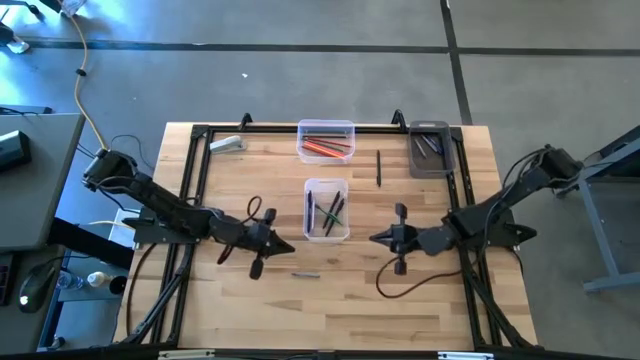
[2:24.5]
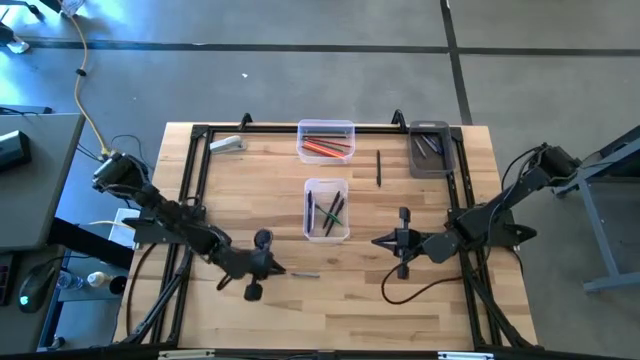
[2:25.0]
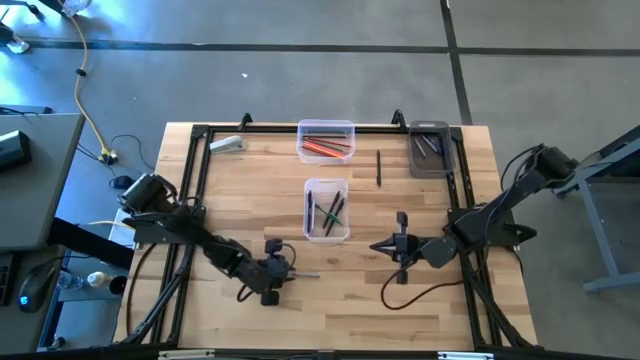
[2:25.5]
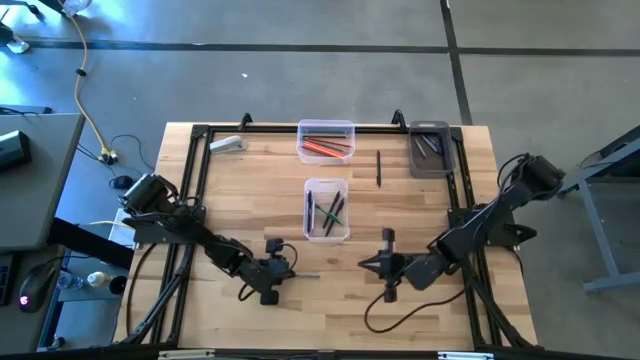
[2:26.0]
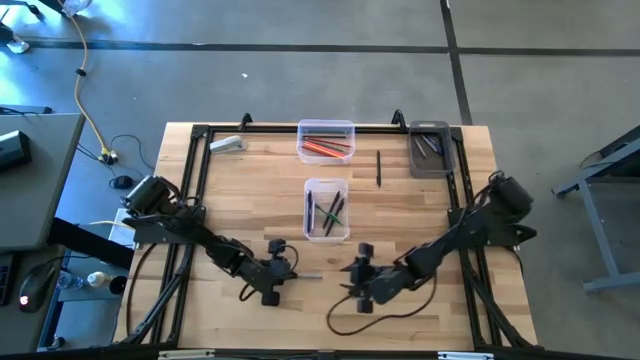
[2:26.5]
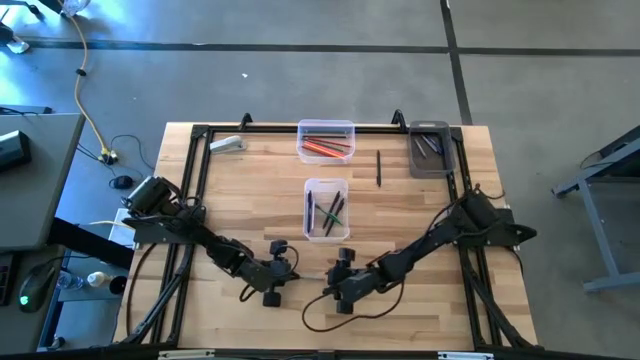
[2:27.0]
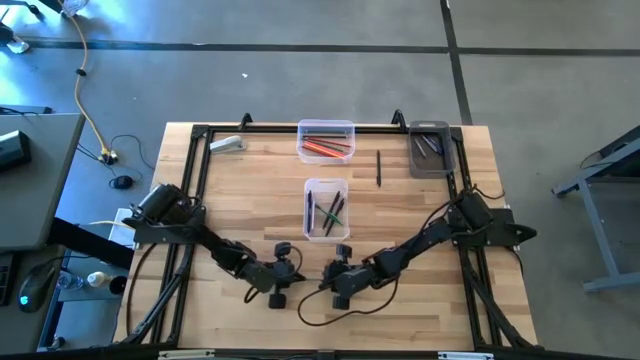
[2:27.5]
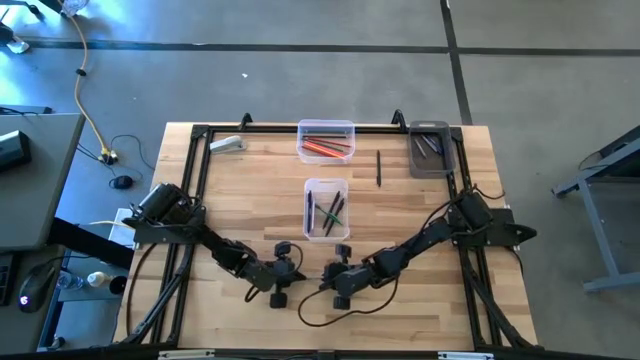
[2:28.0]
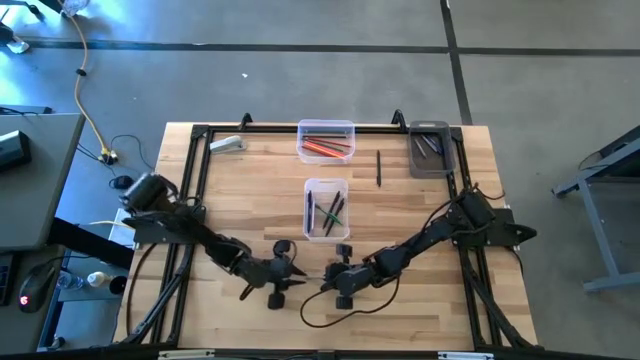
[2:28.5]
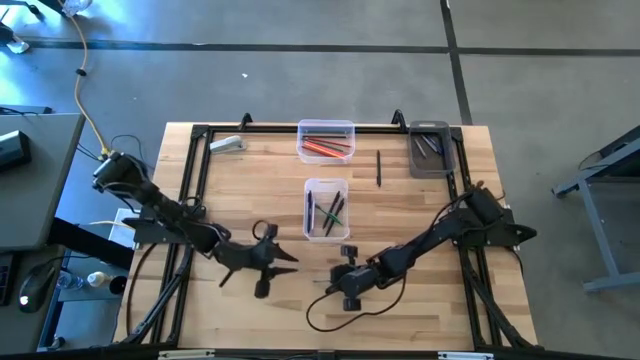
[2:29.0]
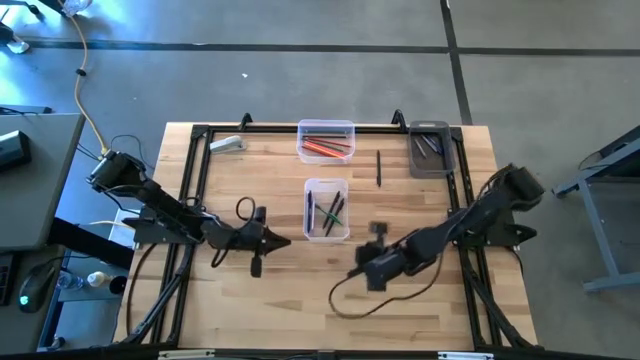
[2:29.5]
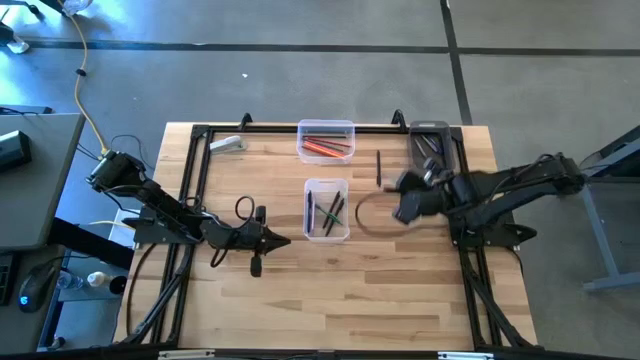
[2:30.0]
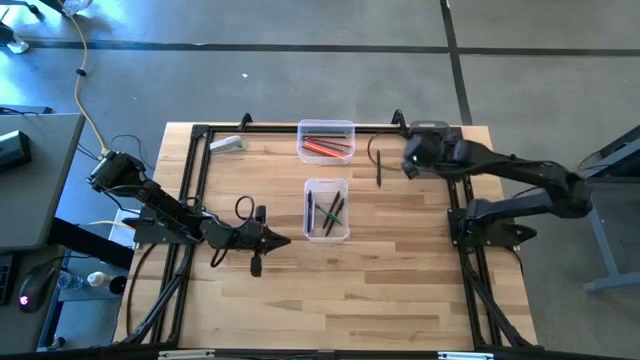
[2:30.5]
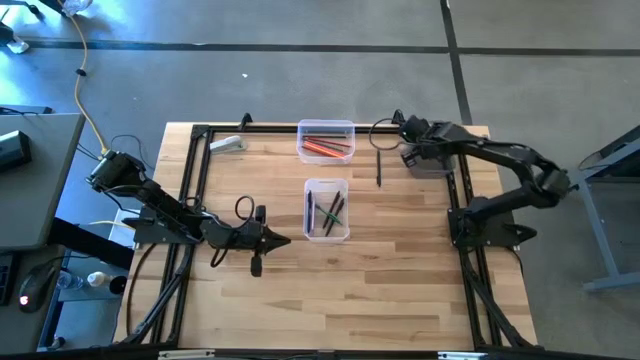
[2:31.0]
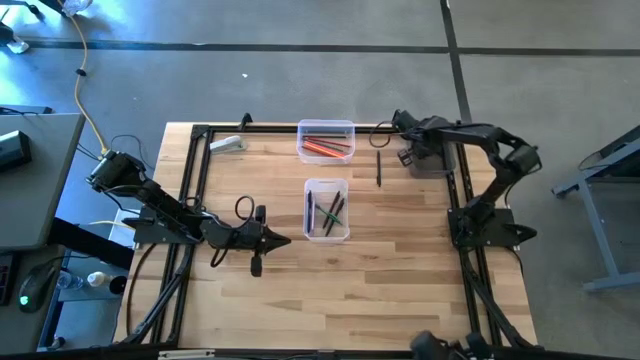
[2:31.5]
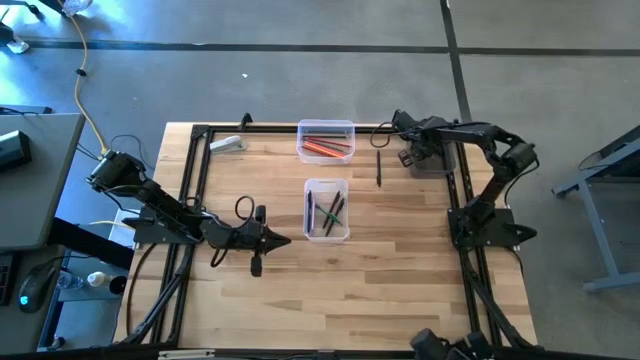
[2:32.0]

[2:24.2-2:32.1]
Task: Sort crayons/erasers/pens/pencils in bins
Put the gray crayon into the transparent black bin

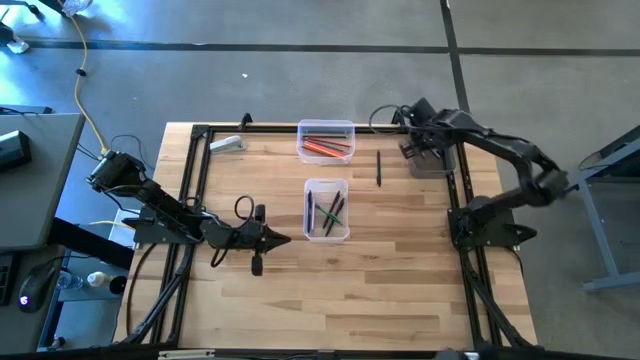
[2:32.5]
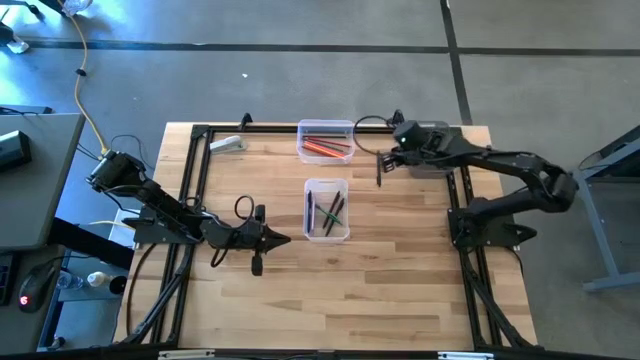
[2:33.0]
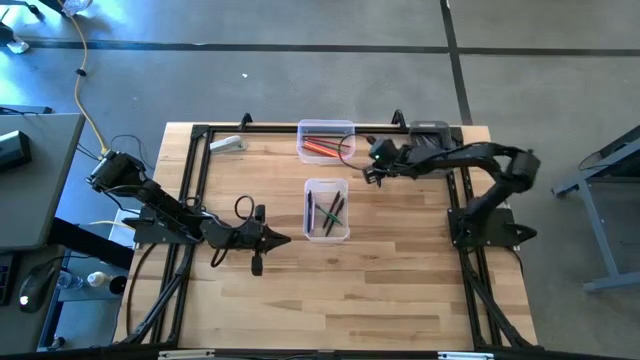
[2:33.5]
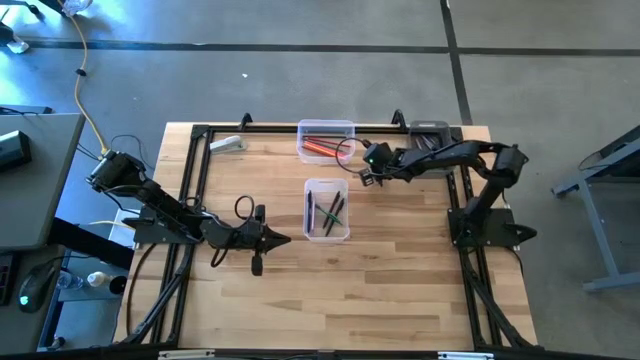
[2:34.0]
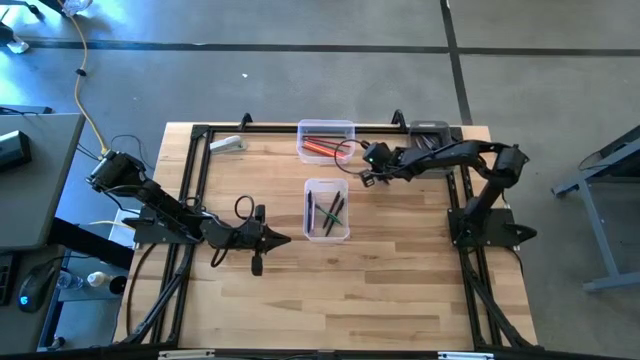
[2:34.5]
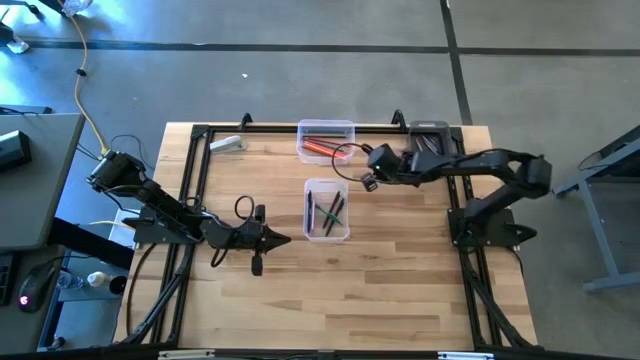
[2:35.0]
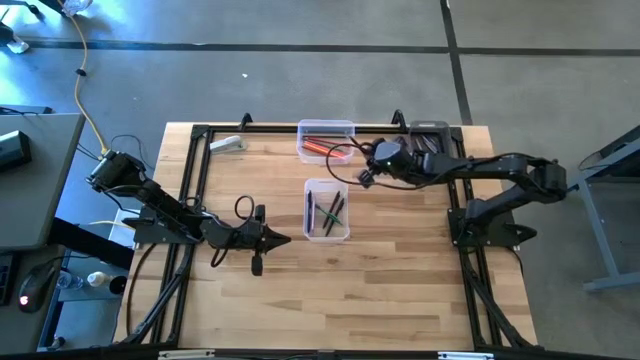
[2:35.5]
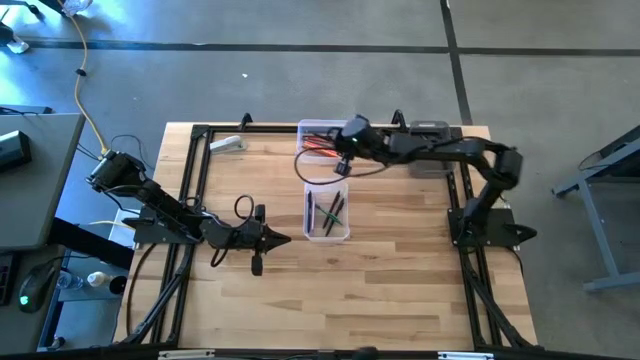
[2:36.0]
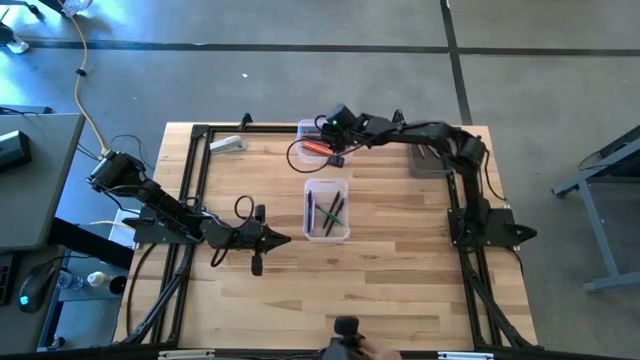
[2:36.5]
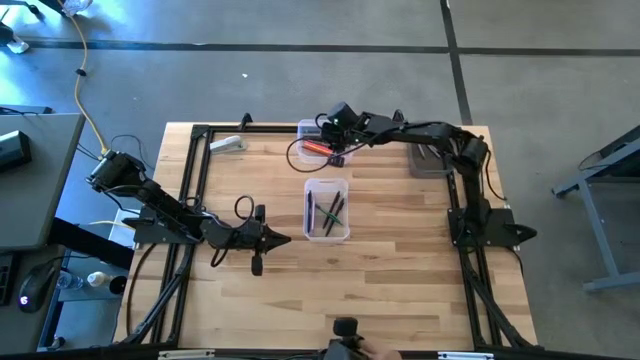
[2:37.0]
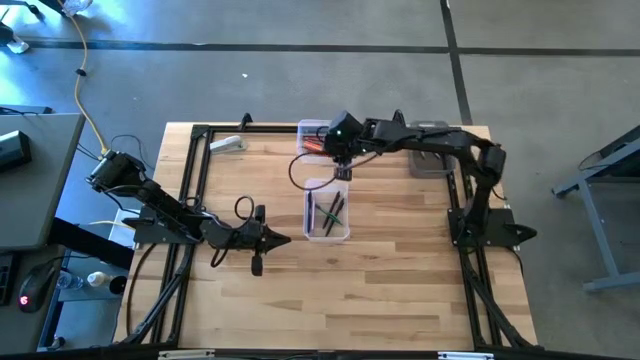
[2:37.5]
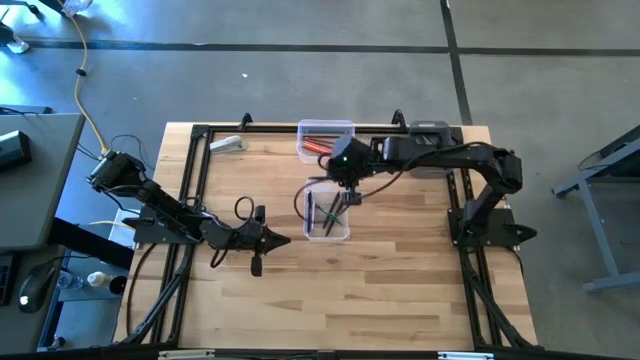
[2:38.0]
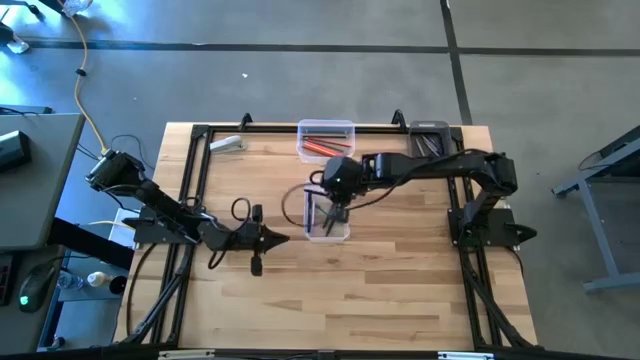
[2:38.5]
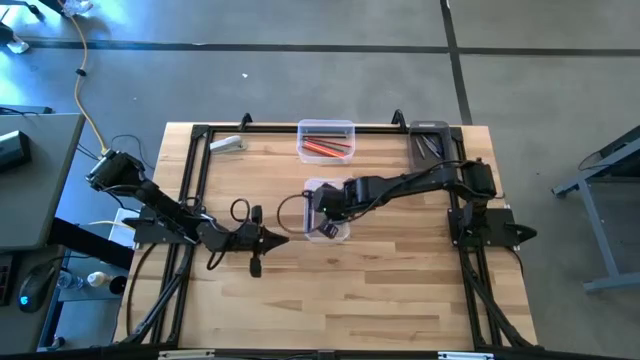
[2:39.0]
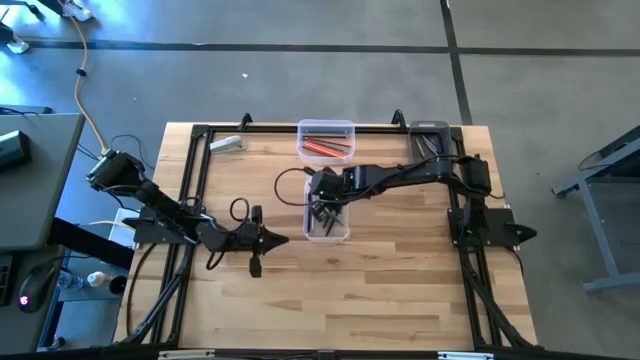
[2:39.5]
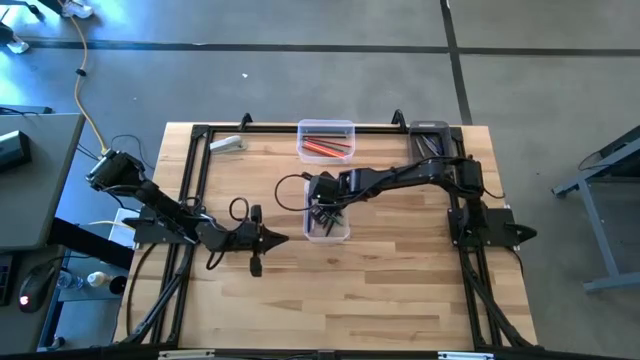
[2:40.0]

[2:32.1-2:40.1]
Put the black pen into the bottom transparent bin

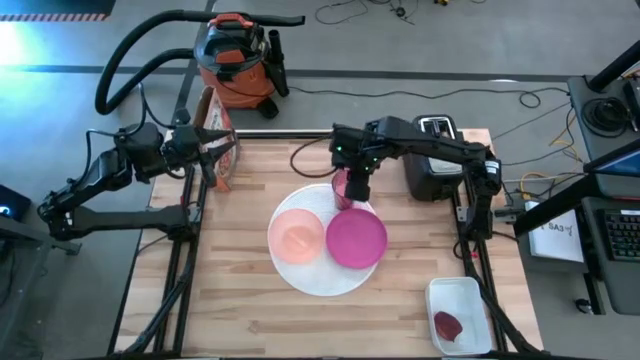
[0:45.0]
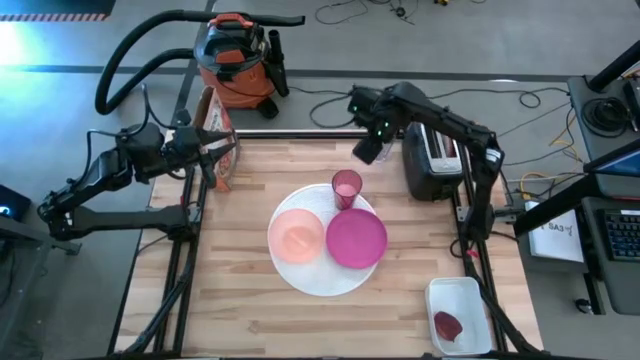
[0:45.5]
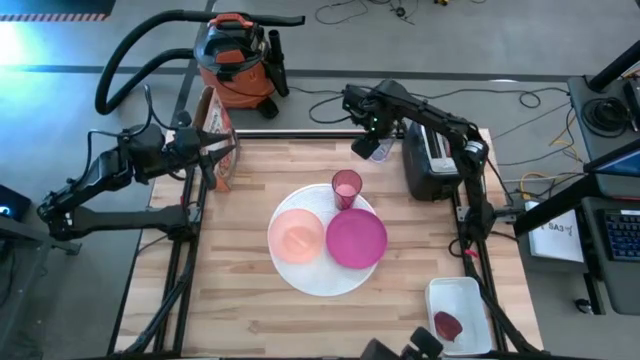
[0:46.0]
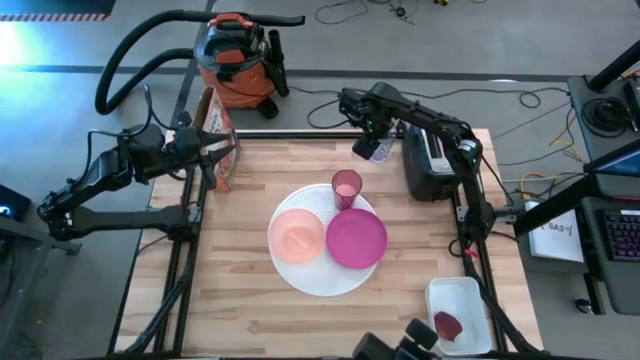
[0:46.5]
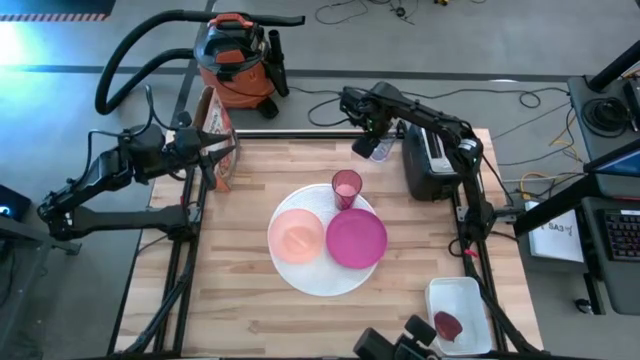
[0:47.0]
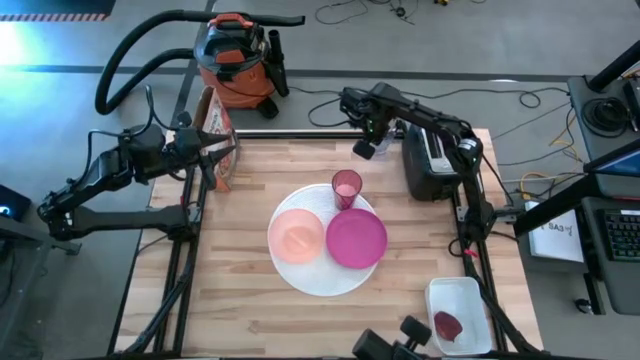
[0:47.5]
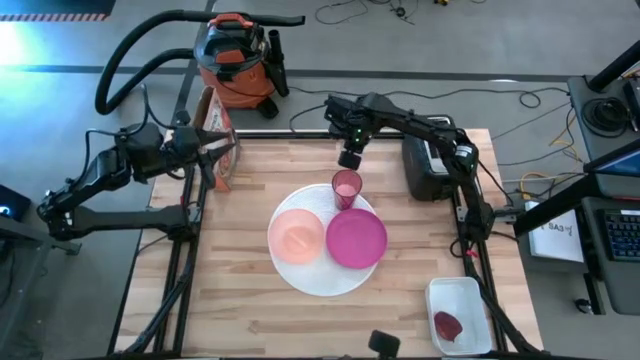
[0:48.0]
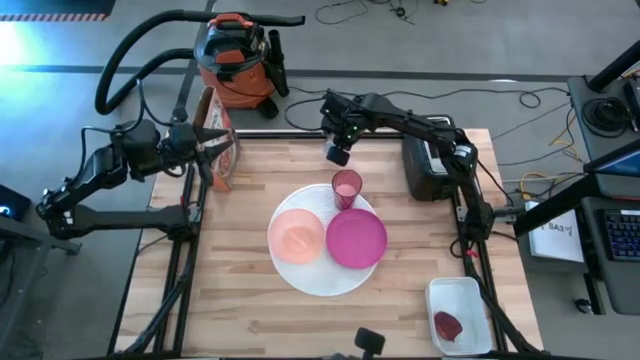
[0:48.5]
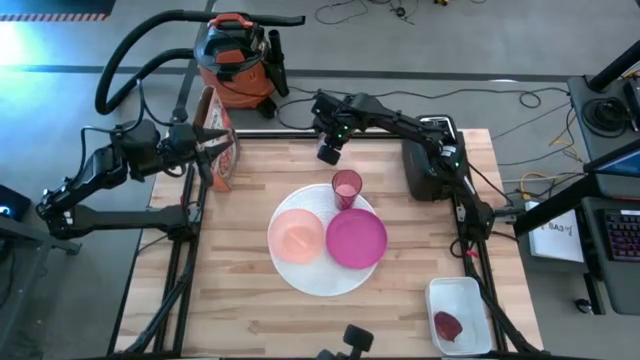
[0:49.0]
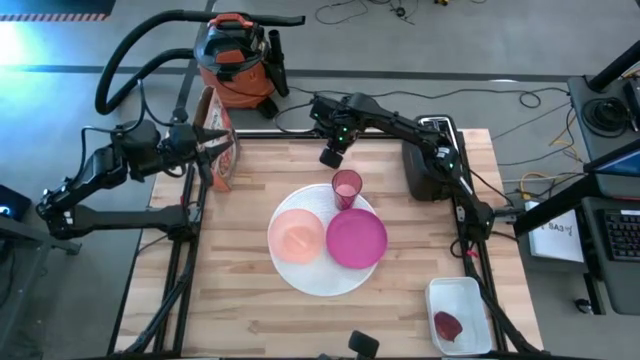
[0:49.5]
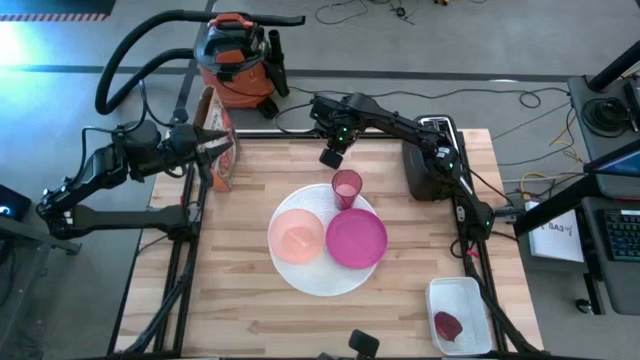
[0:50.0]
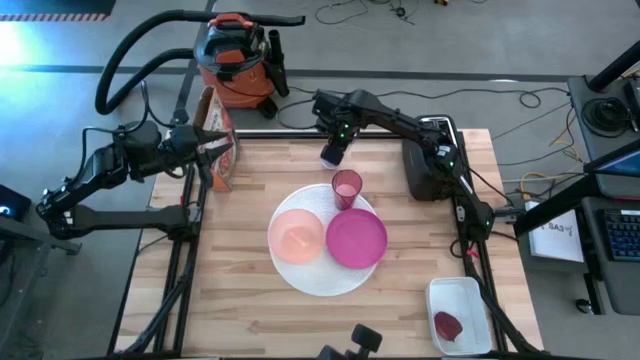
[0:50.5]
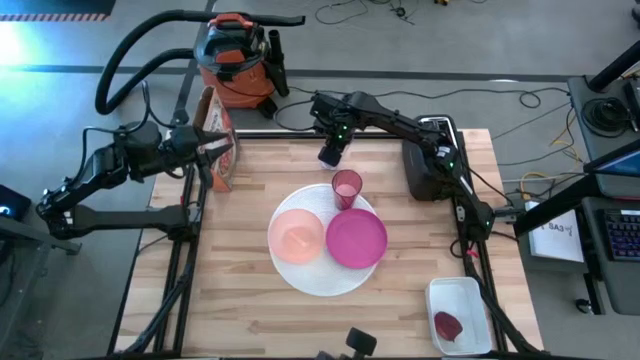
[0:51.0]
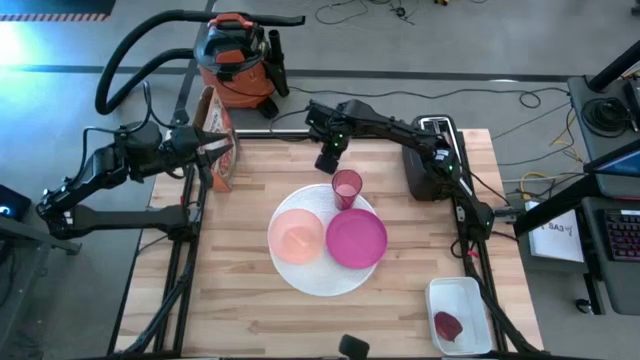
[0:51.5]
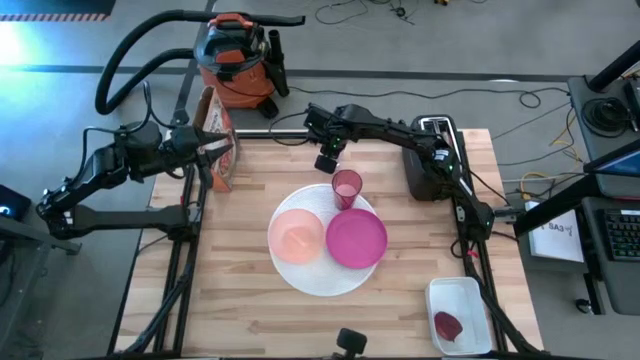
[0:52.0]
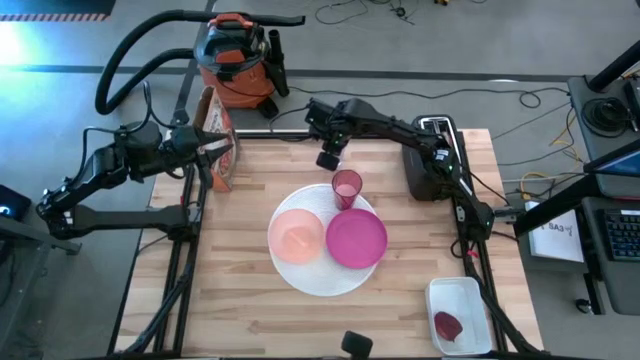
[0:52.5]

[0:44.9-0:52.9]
Task: Arrange a breakfast setting
Move the transparent glass with the spoon to the top center of the table
